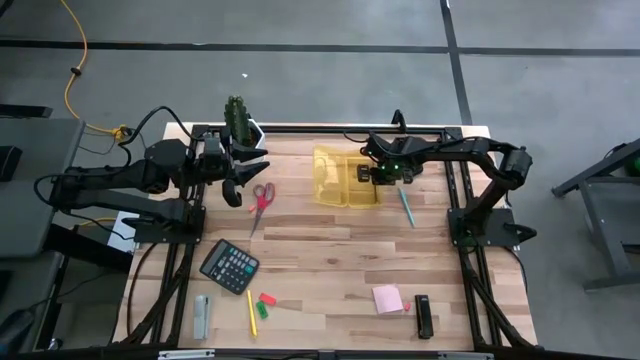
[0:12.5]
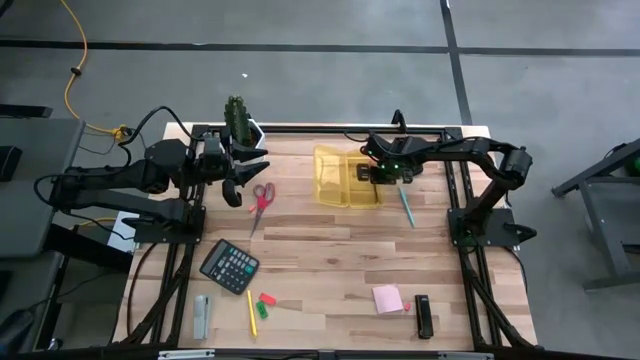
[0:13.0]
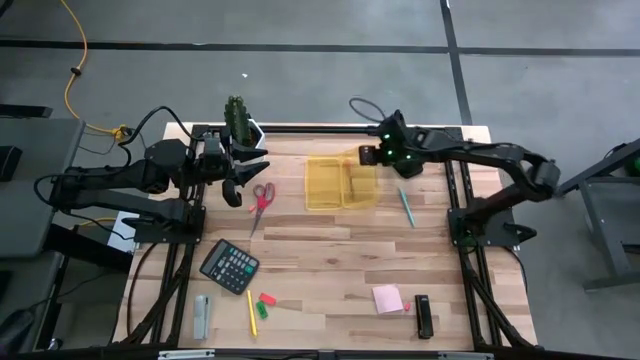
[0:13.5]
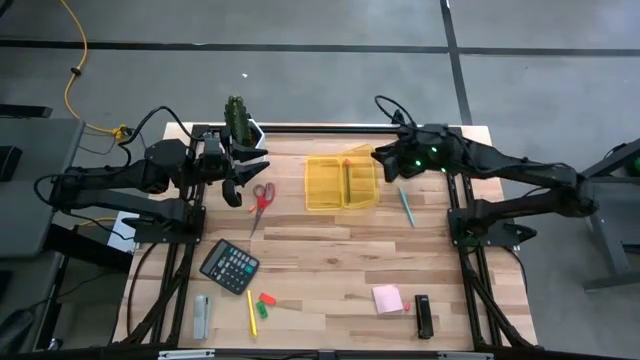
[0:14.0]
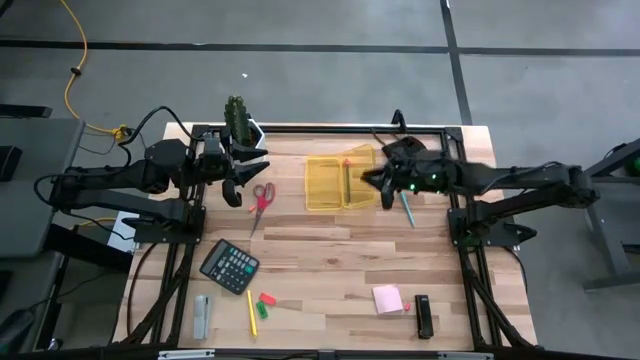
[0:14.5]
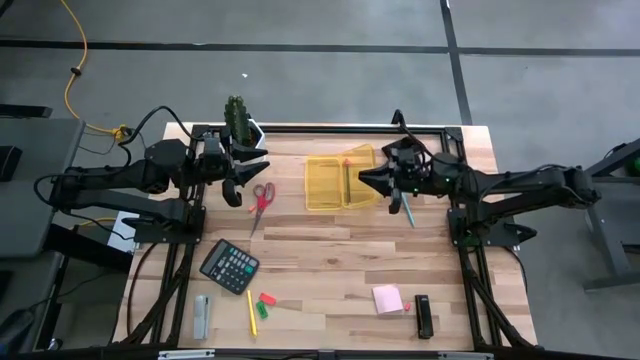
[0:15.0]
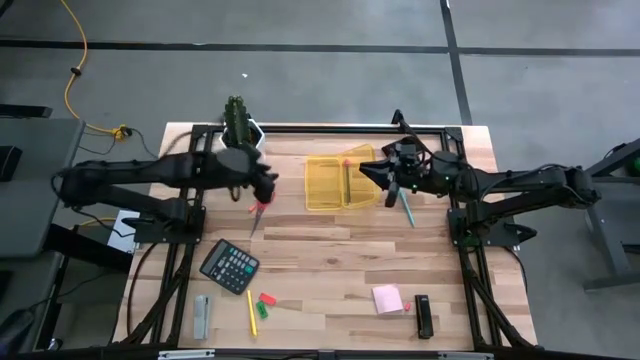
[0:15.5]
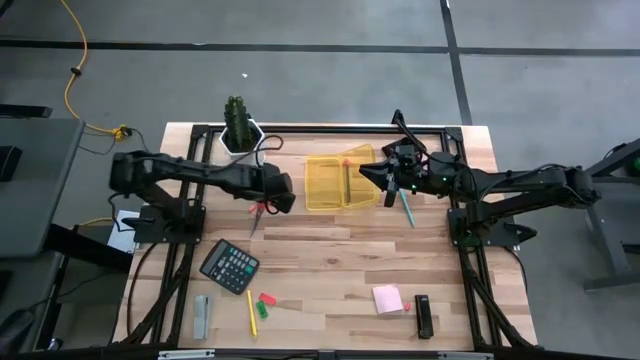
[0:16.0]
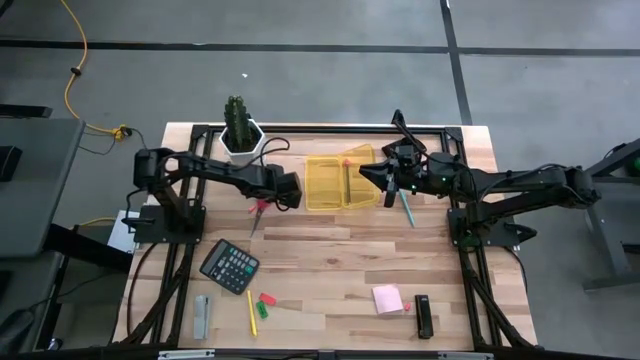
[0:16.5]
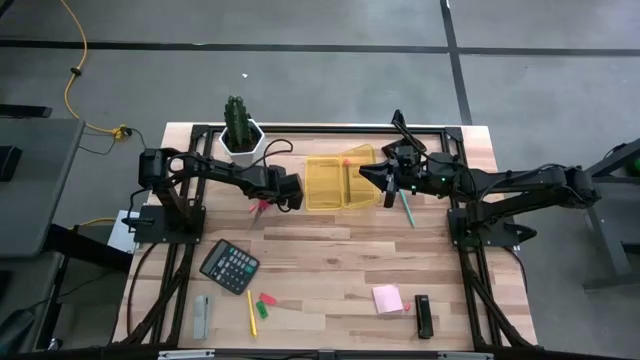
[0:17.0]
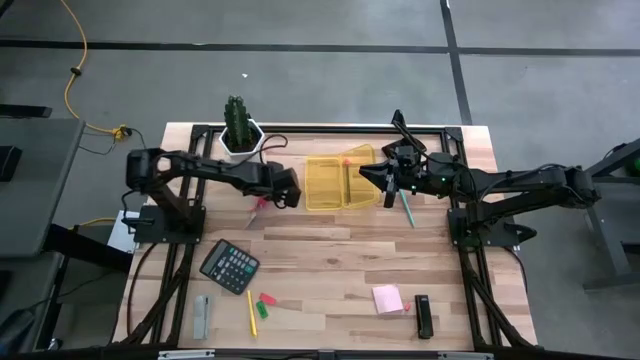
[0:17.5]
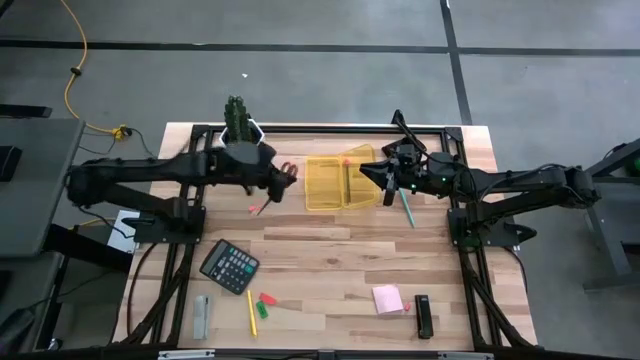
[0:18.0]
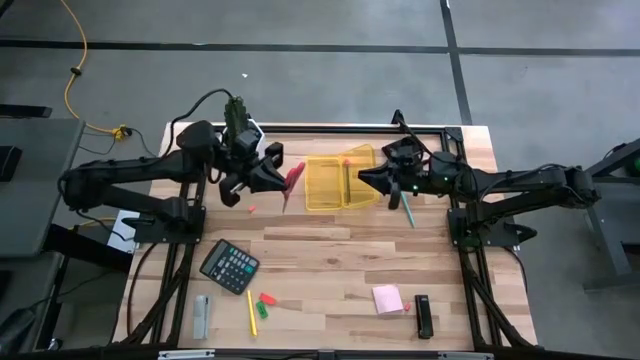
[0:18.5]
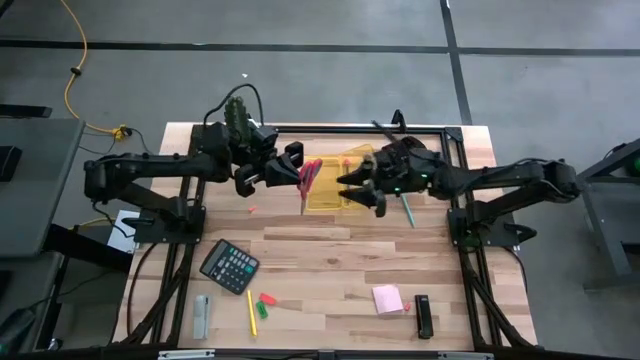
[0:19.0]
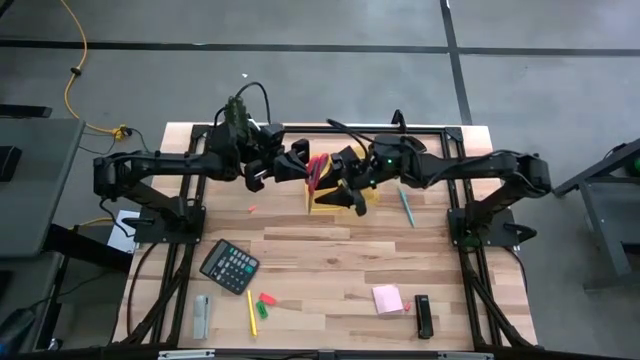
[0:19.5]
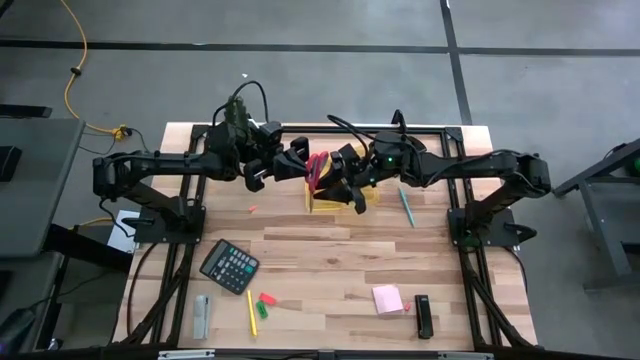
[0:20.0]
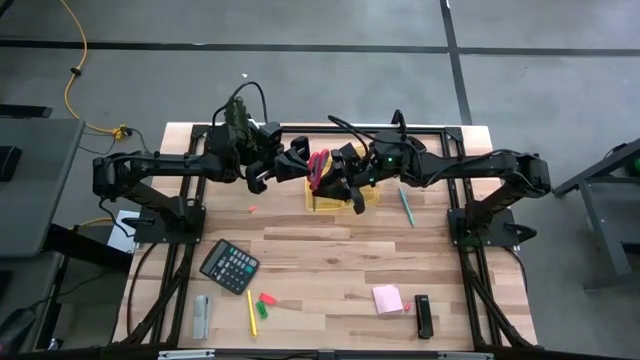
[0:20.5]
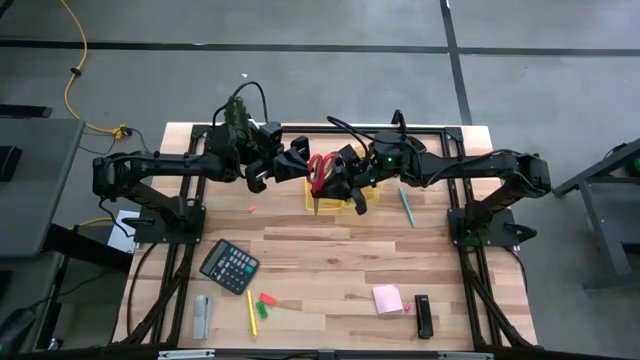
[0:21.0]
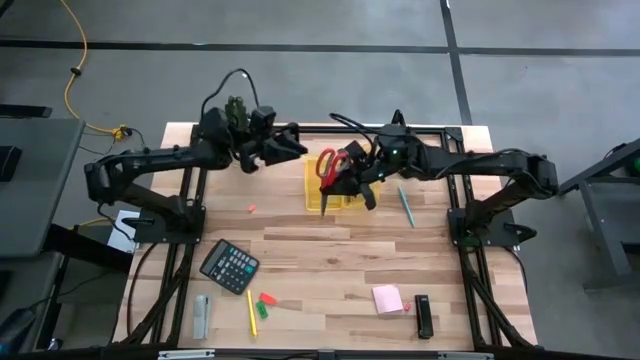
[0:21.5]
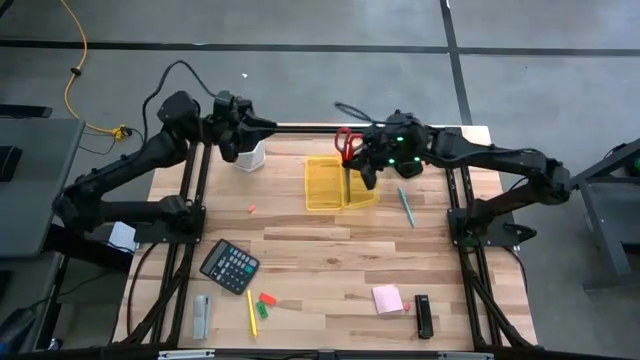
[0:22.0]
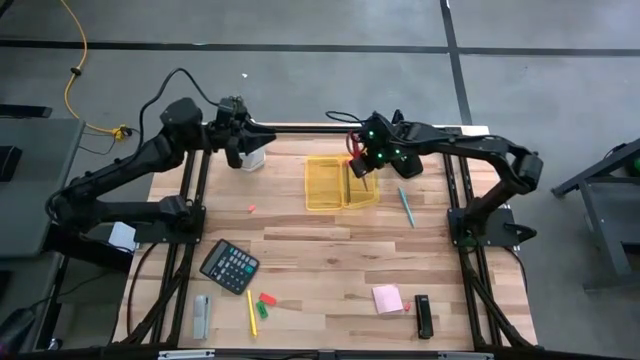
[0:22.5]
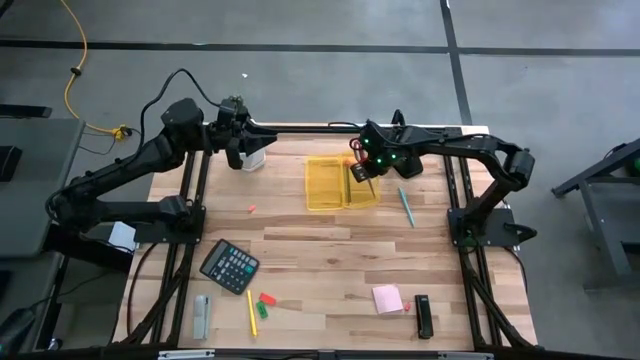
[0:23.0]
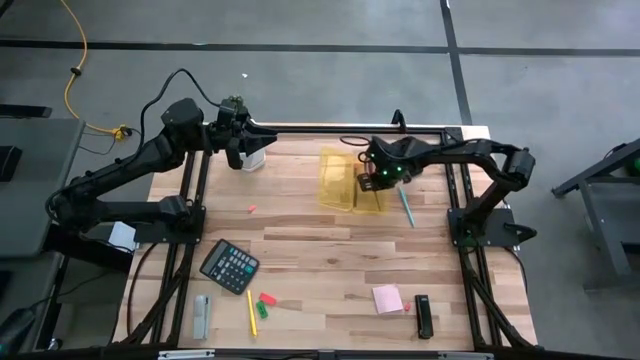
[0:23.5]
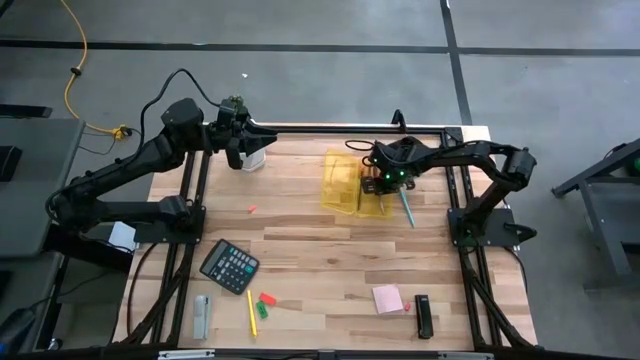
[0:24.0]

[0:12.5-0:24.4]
Task: Pack school essentials
Put the red scissors into the yellow supply box

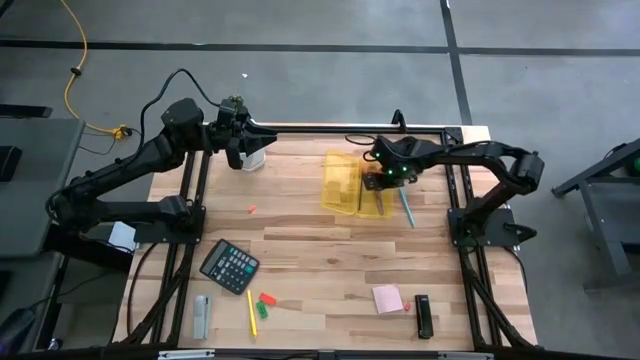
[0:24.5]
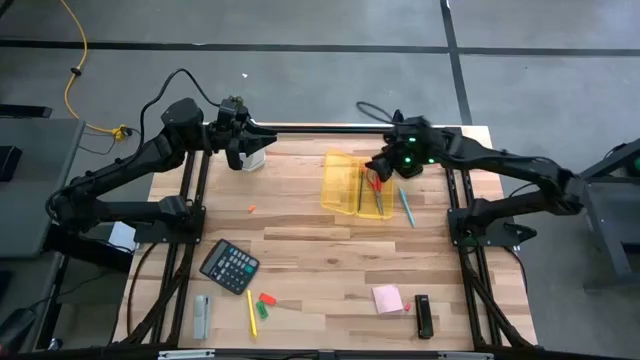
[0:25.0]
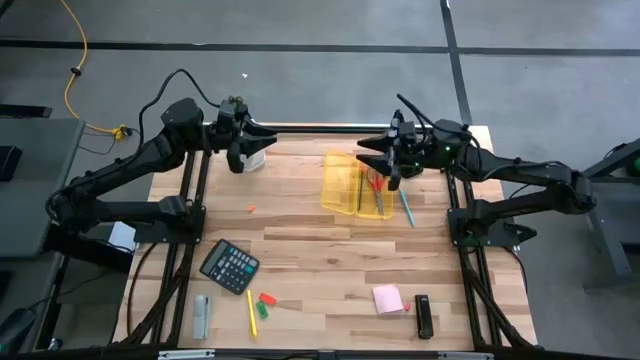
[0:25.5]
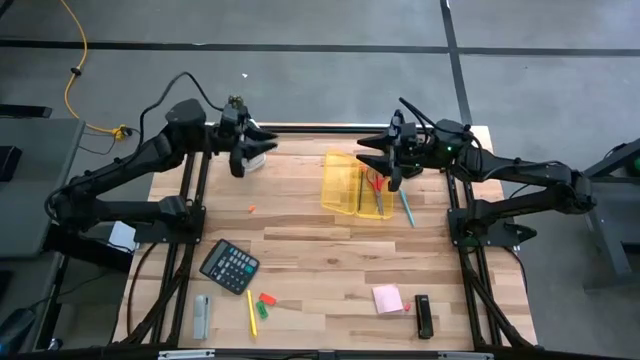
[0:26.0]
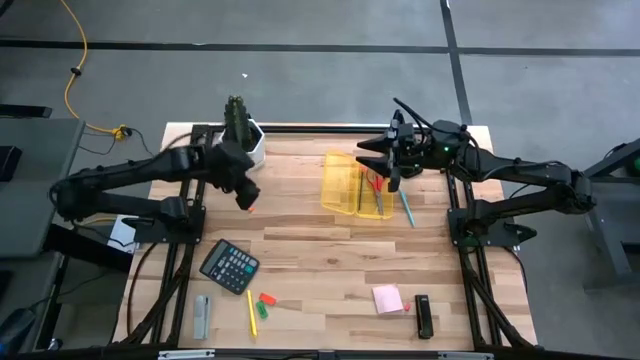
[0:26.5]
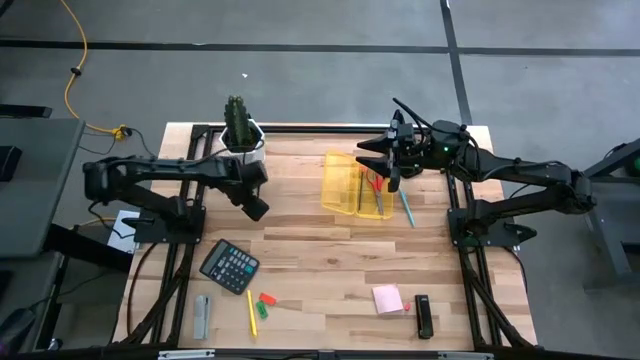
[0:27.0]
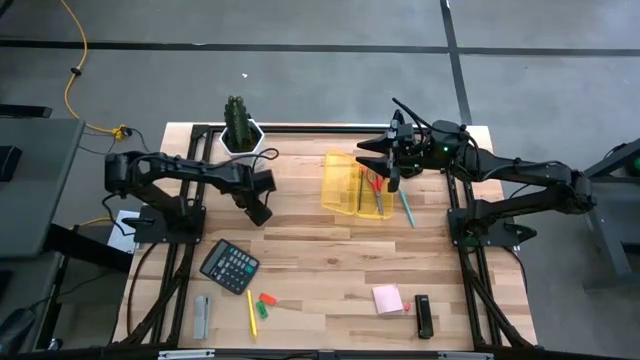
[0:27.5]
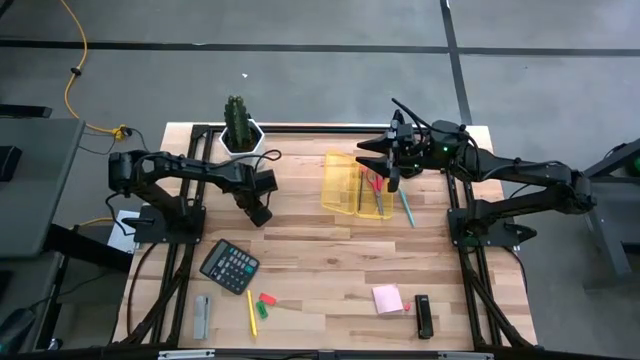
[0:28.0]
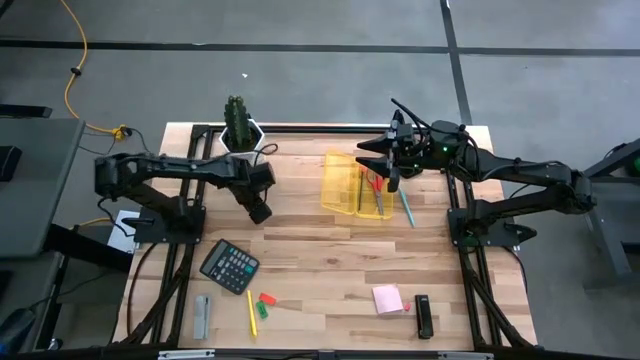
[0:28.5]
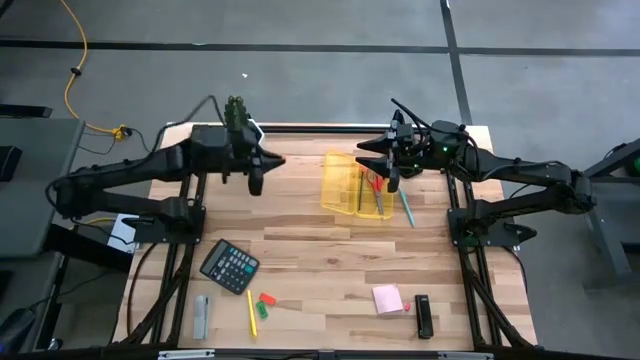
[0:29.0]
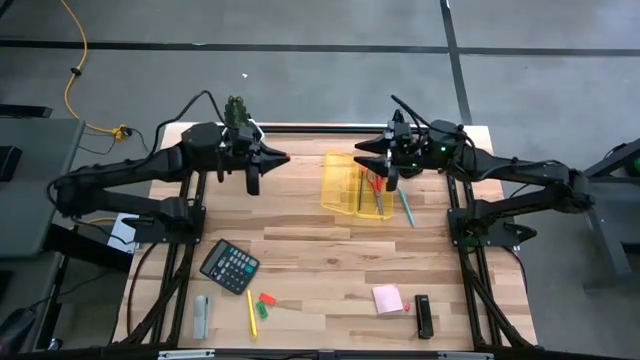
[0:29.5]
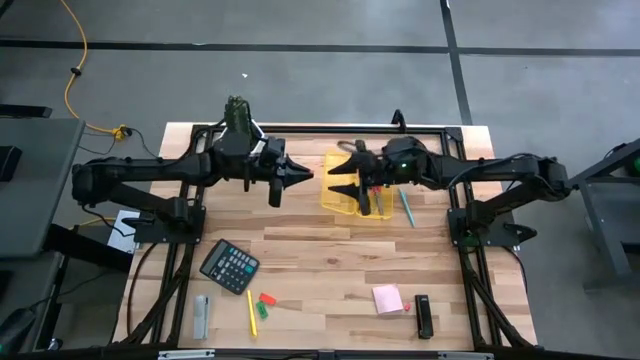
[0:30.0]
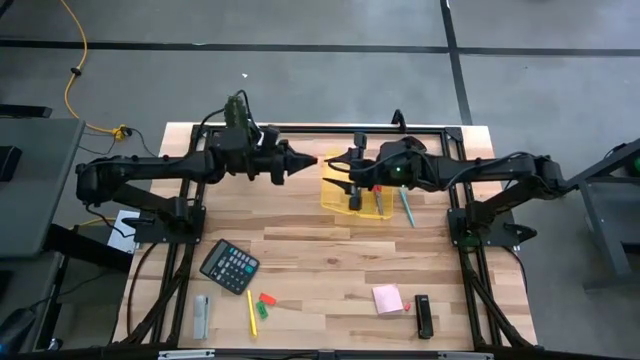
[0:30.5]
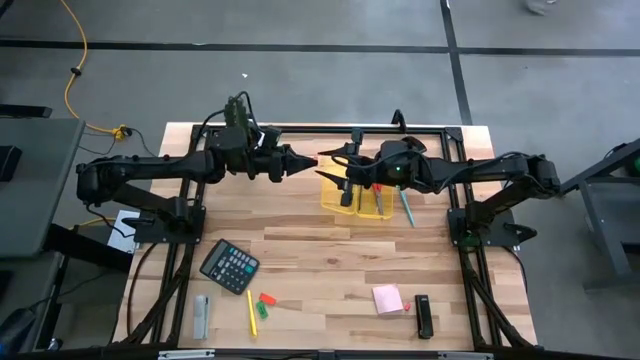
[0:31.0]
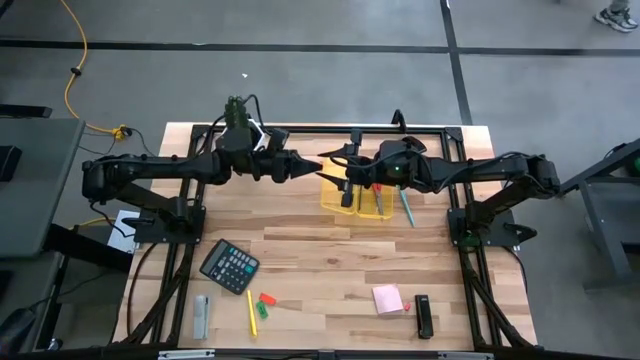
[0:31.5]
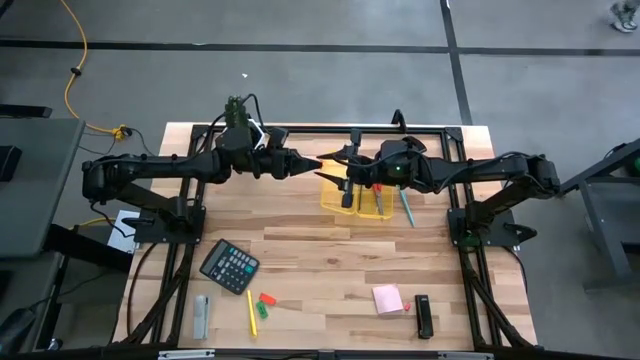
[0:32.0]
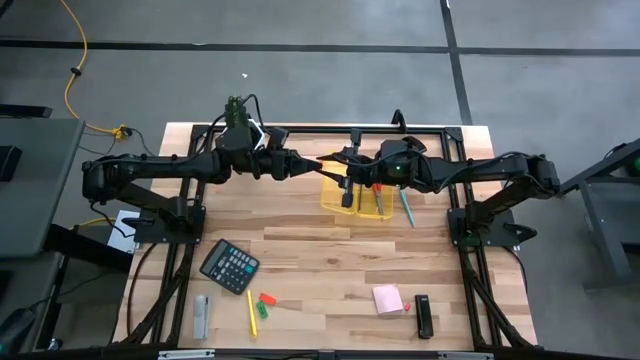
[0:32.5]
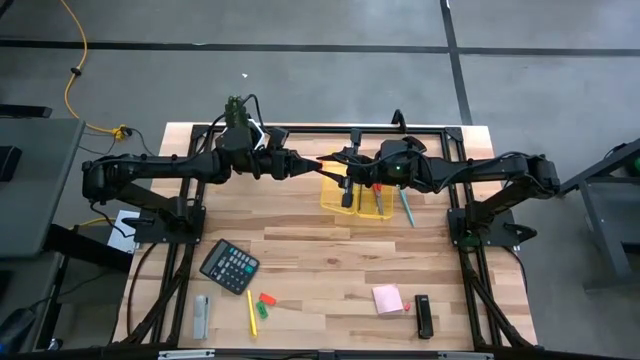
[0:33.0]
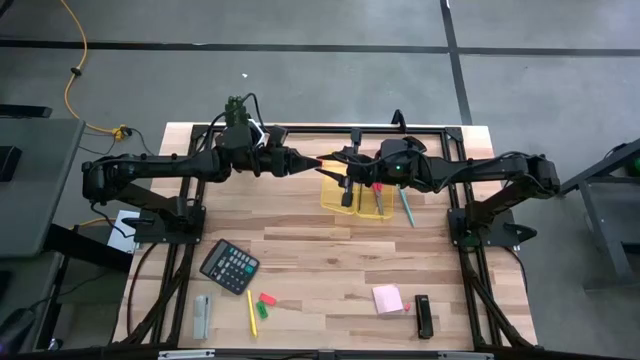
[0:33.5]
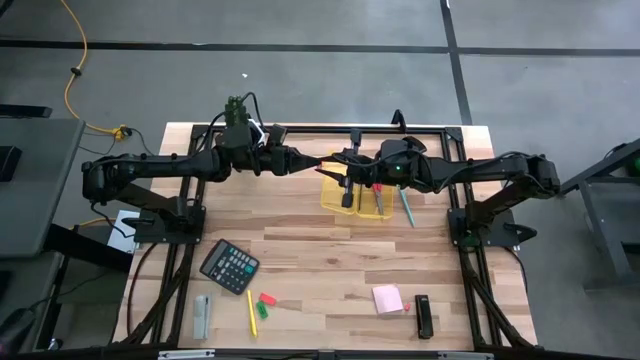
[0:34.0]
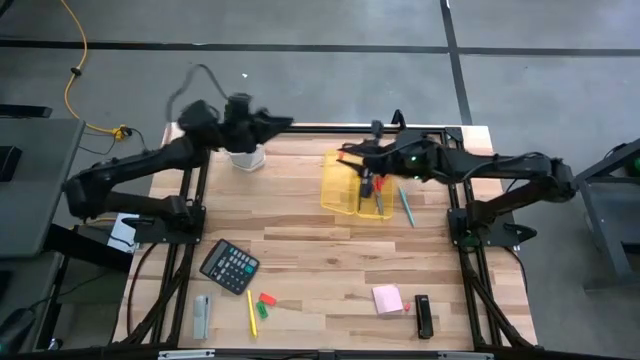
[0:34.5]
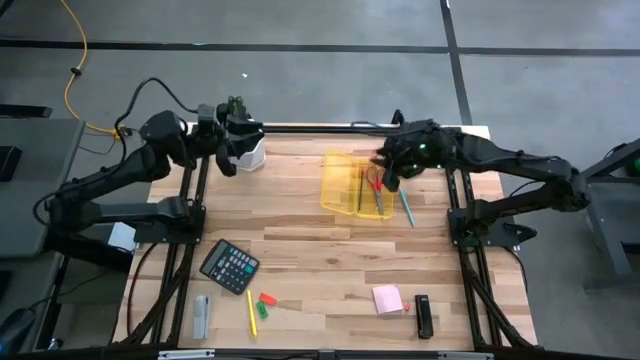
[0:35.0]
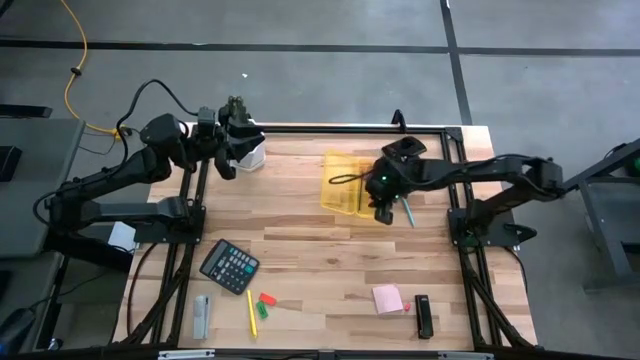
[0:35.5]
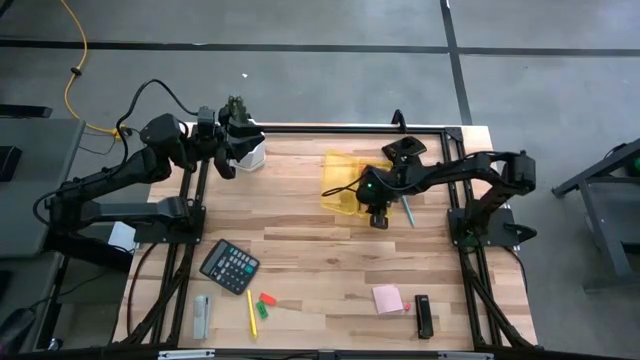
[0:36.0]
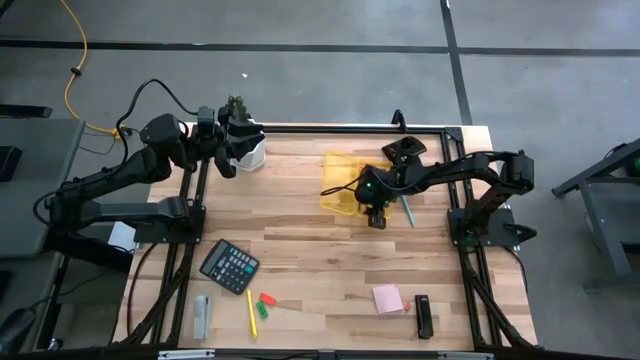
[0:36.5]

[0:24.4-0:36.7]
Put the orange pencil top eraser into the yellow supply box
